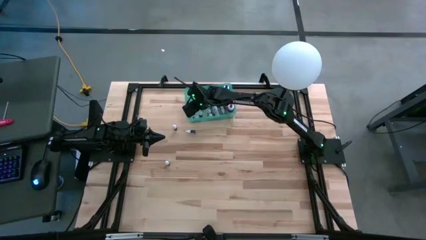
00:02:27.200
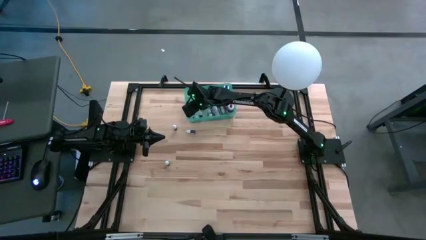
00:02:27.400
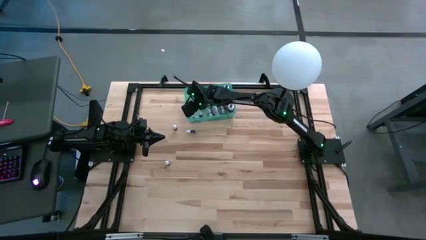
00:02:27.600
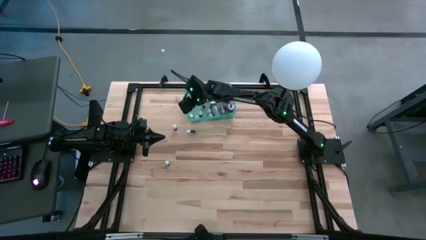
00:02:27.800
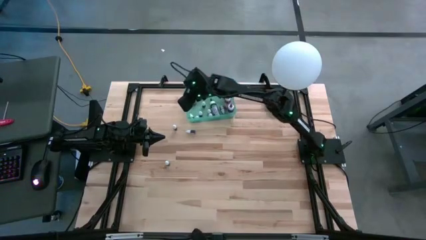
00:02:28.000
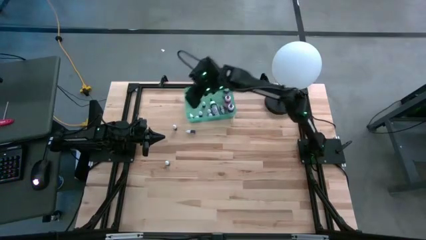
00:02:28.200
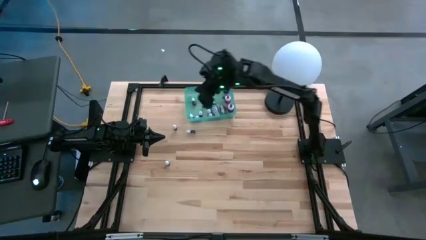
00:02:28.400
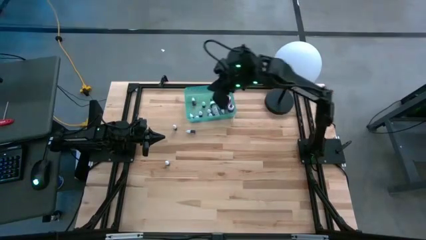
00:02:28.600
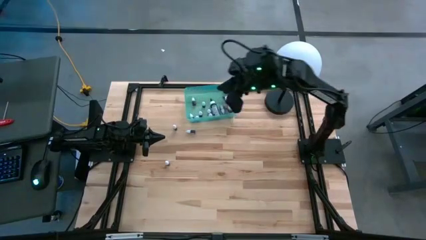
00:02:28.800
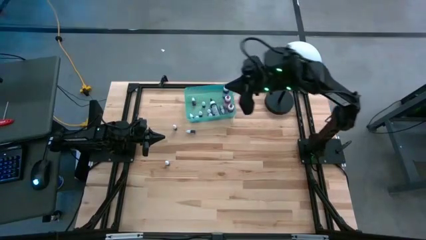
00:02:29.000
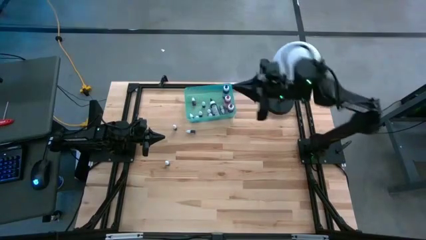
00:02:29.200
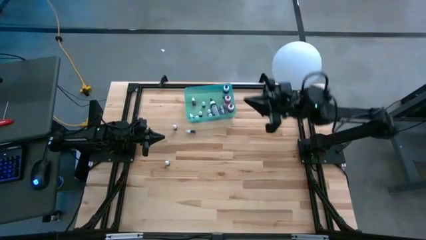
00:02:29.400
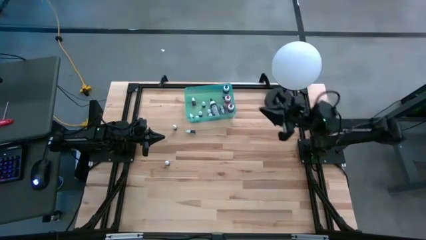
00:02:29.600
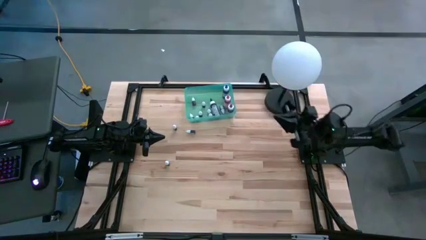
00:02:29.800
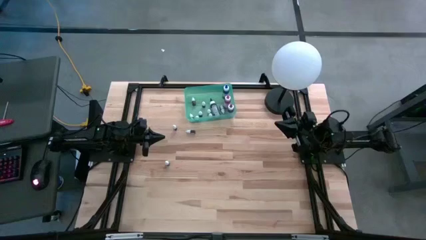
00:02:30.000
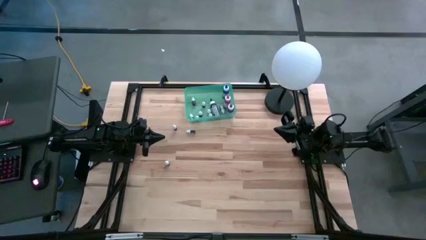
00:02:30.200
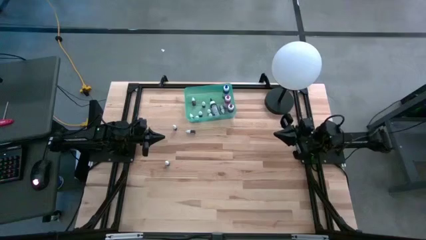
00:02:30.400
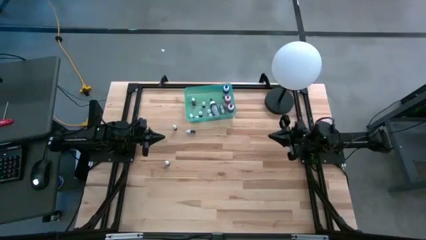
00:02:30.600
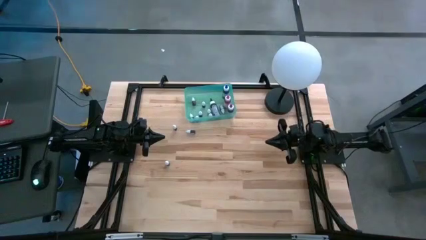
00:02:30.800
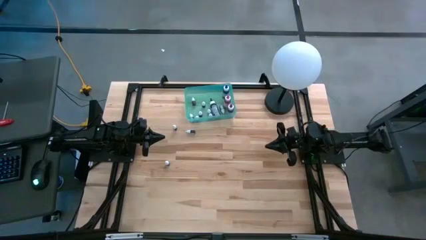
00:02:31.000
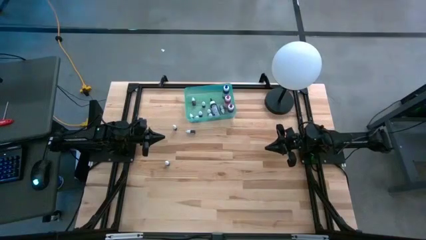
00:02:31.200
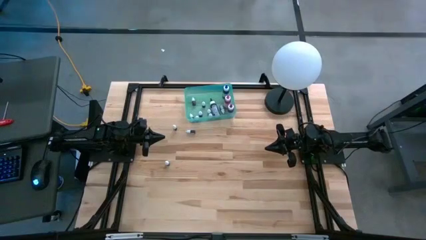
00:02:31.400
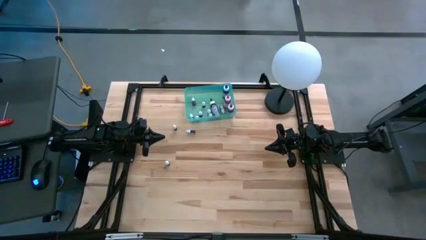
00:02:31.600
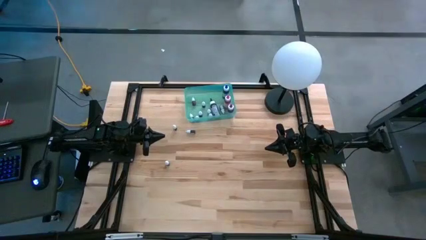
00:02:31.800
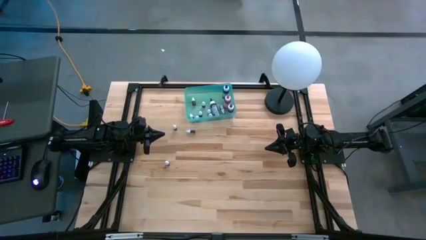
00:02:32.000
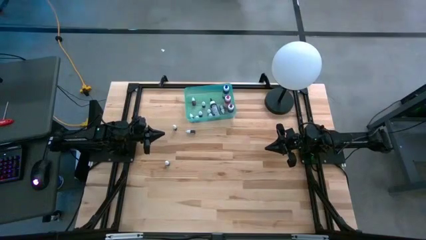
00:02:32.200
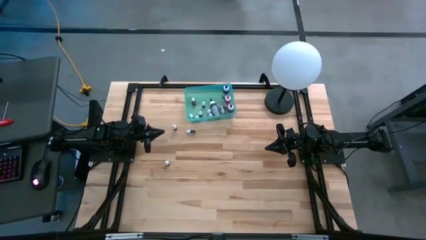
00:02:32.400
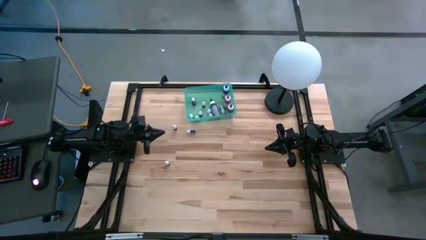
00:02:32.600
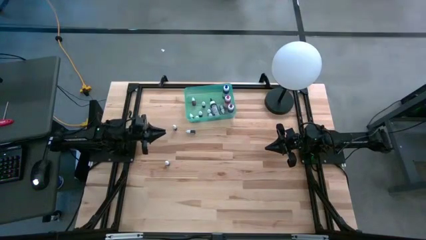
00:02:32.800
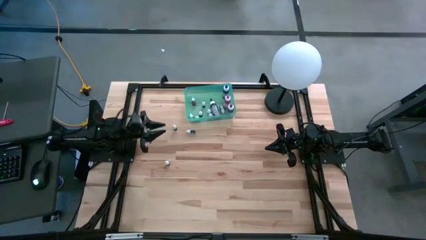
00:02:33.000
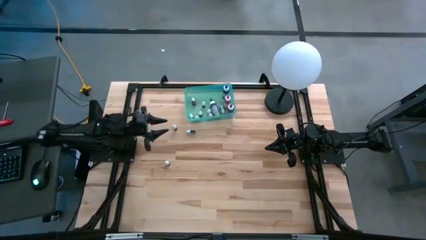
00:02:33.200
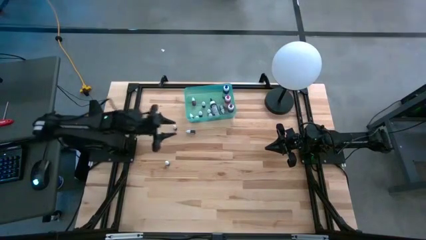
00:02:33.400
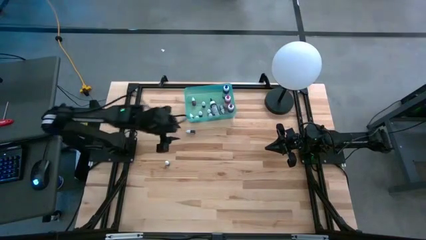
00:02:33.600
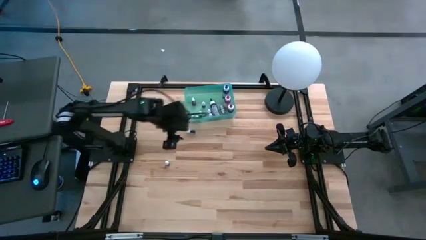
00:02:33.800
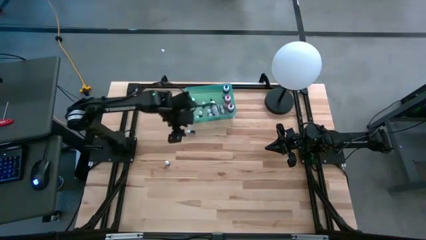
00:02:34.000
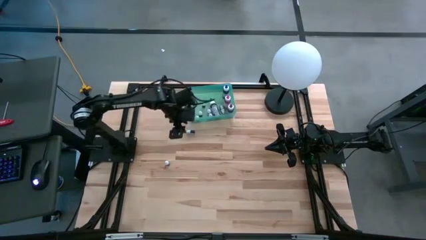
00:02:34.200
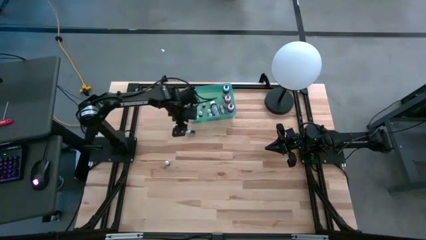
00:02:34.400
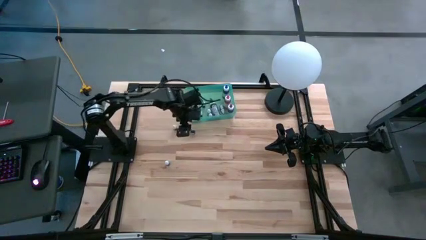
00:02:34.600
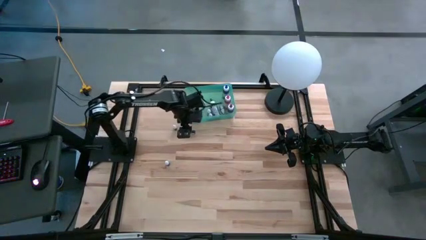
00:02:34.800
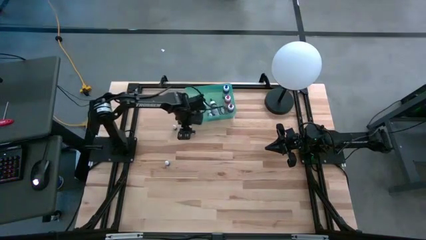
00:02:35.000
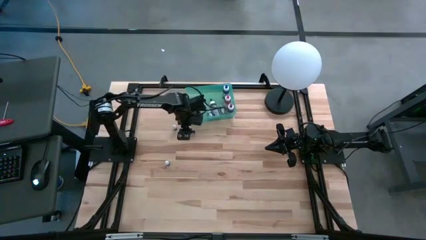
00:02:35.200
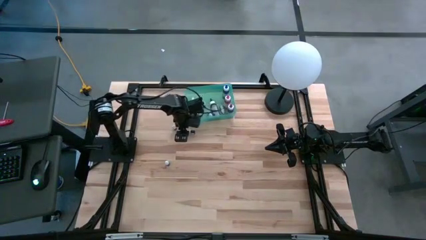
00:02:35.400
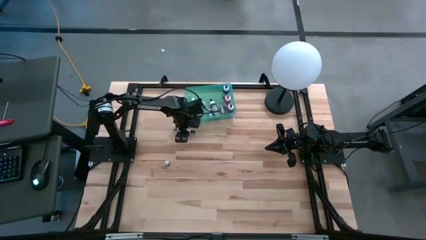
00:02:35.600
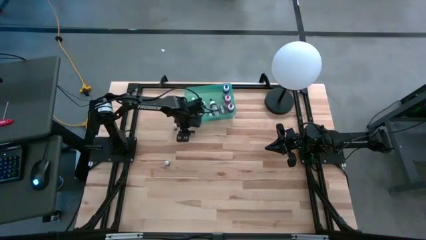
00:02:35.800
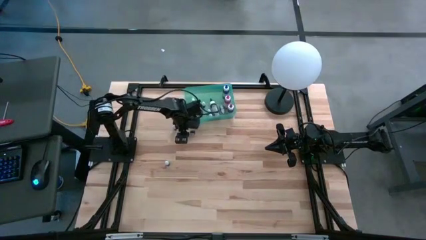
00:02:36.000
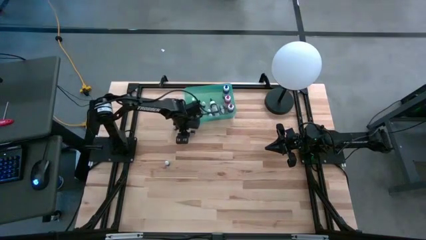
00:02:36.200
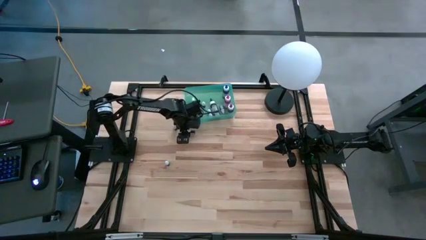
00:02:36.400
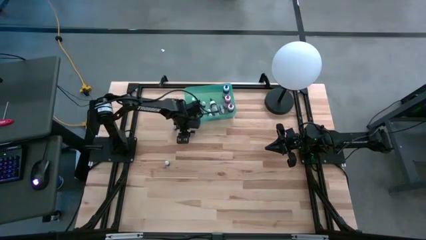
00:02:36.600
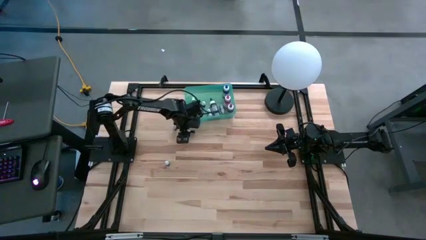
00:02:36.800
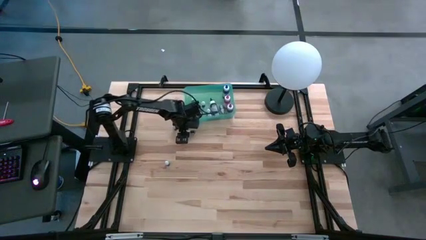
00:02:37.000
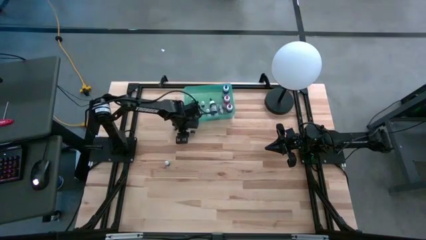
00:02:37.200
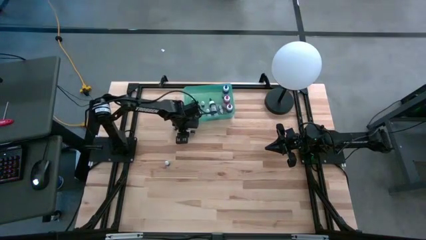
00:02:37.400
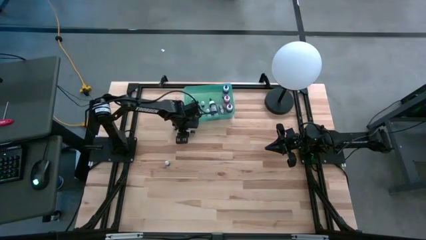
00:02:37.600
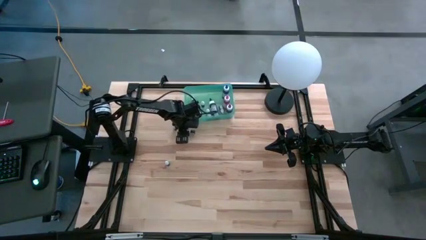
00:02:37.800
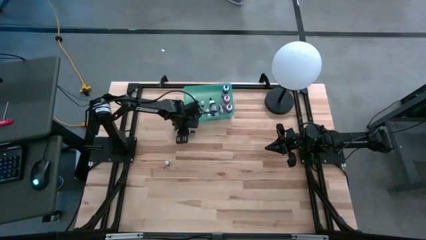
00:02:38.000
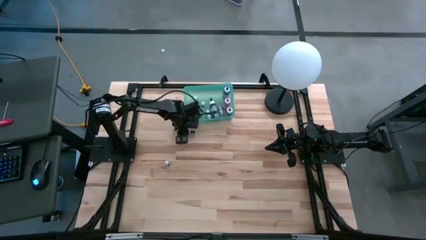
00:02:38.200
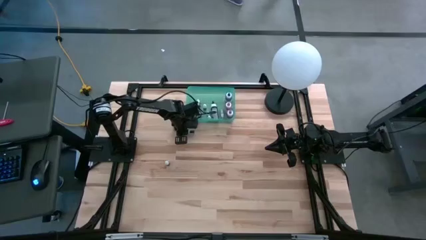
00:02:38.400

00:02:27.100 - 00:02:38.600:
Task: Pick & Place food coloring
Put the small purple food coloring into the bin
